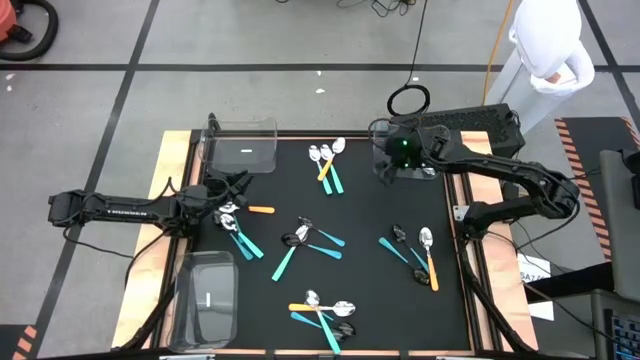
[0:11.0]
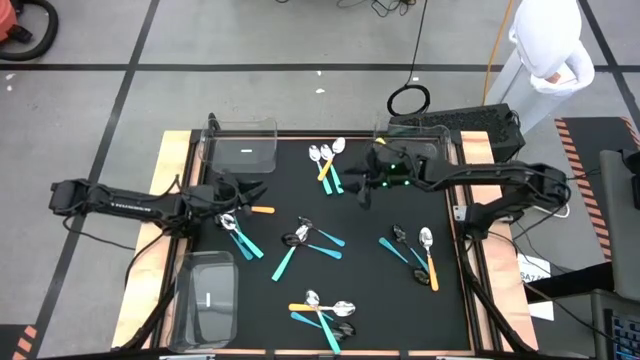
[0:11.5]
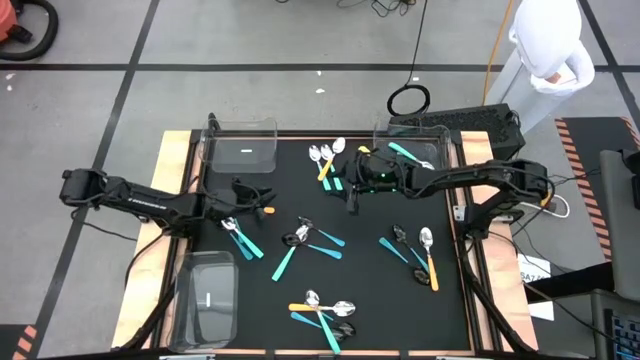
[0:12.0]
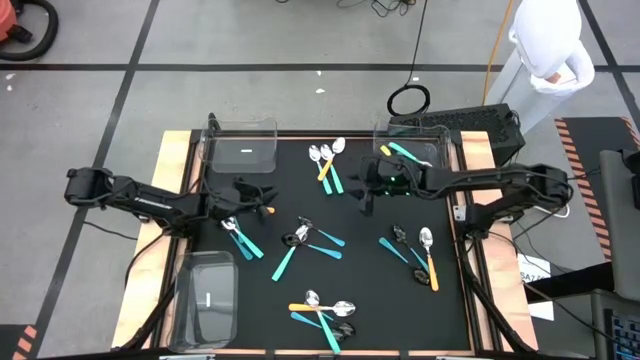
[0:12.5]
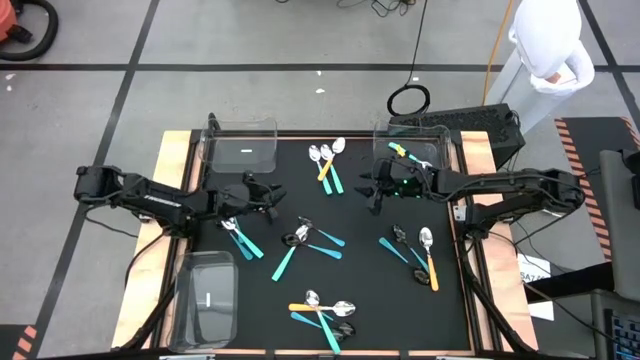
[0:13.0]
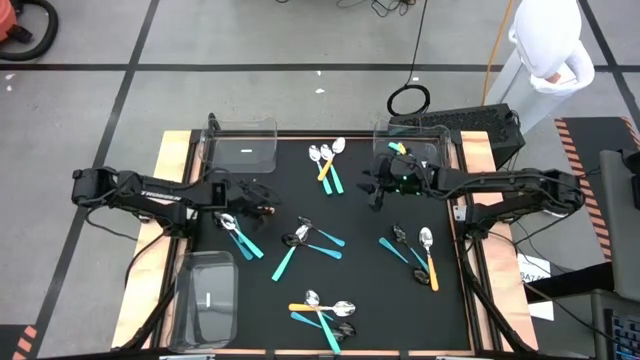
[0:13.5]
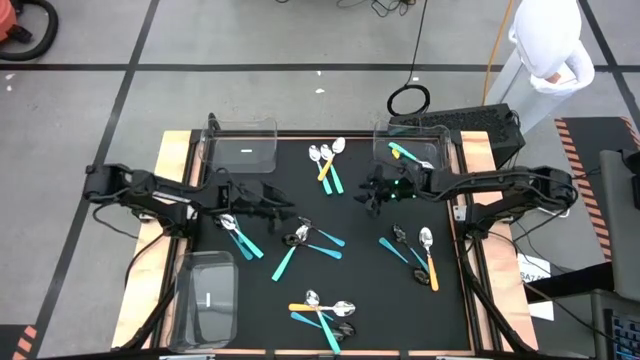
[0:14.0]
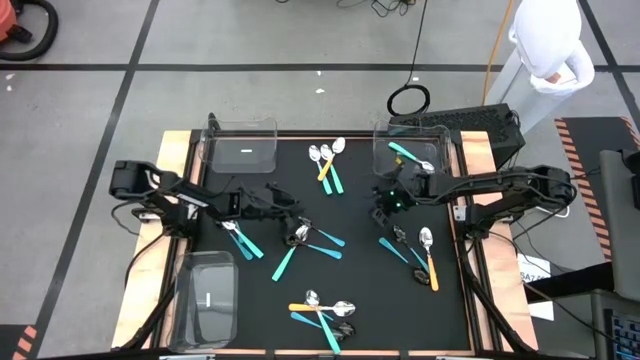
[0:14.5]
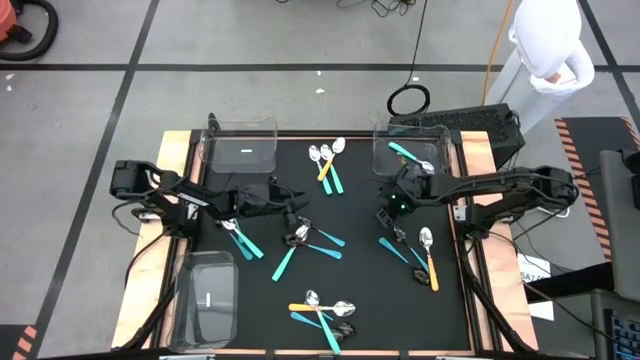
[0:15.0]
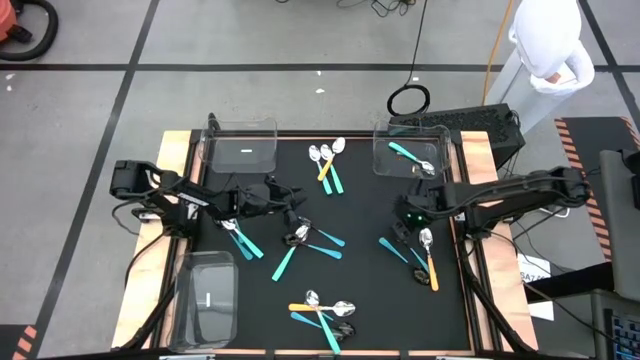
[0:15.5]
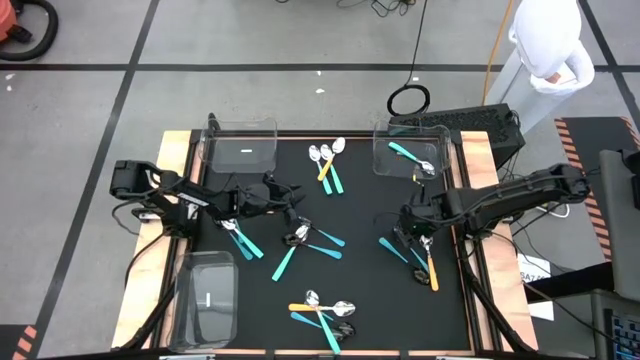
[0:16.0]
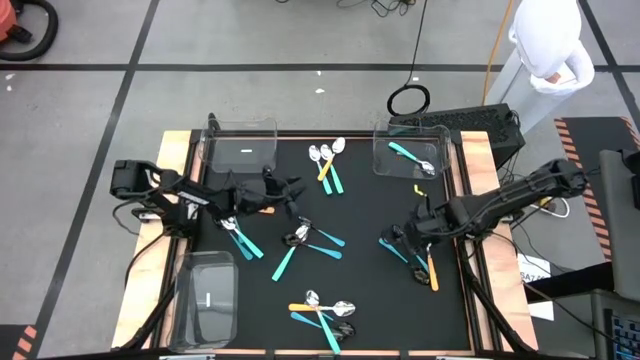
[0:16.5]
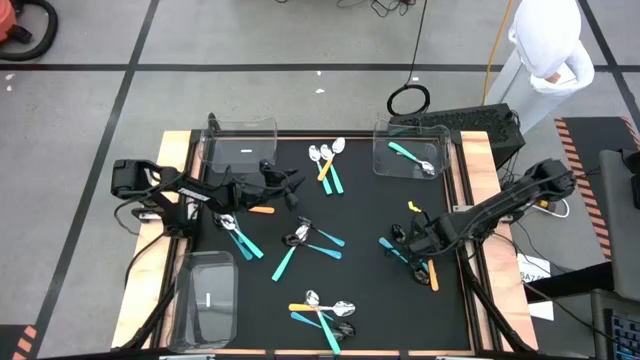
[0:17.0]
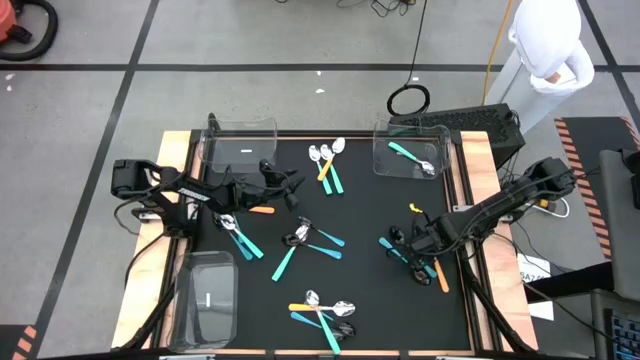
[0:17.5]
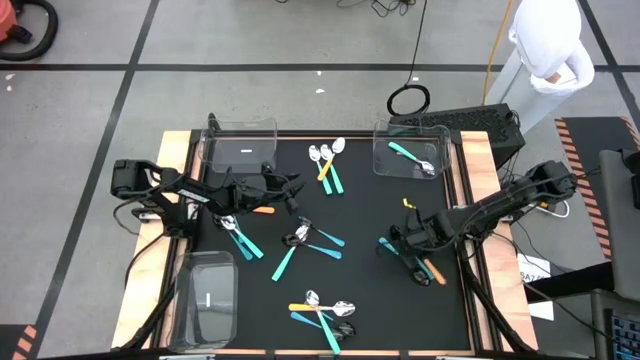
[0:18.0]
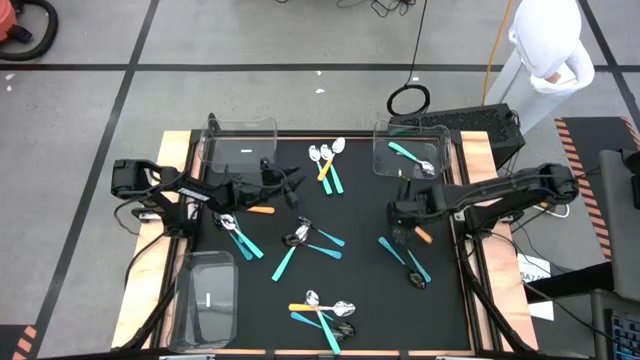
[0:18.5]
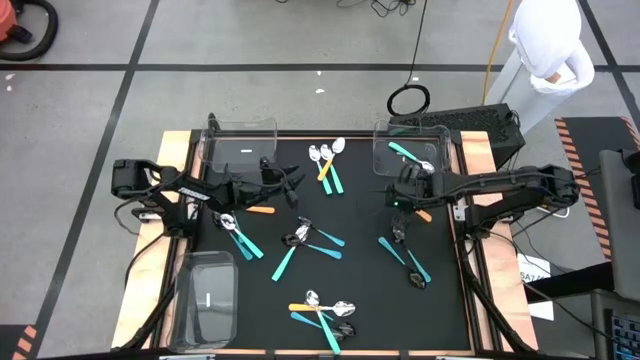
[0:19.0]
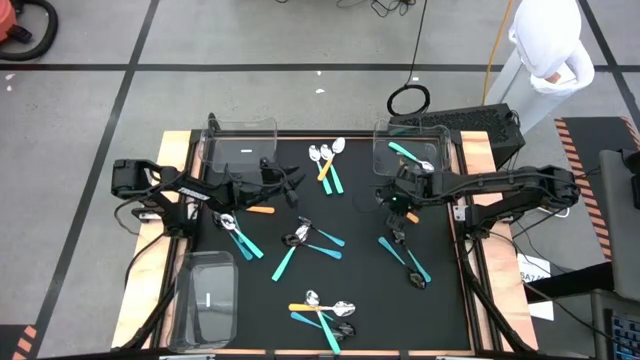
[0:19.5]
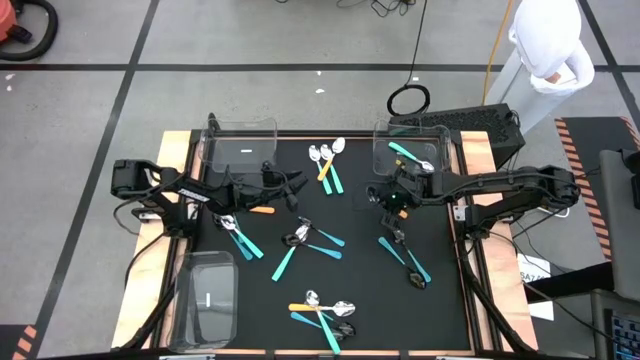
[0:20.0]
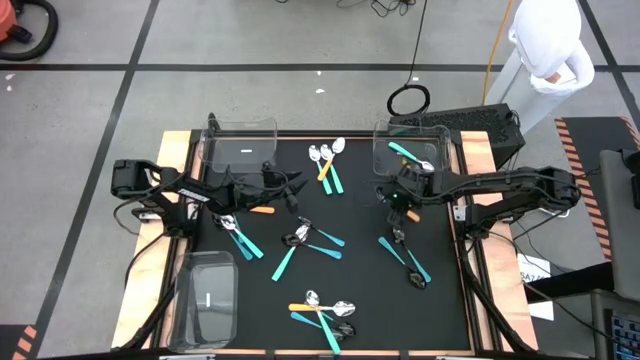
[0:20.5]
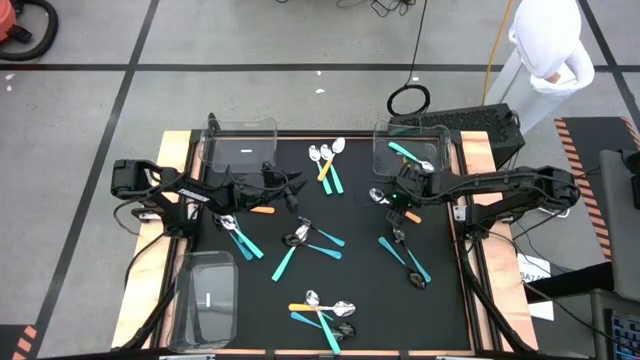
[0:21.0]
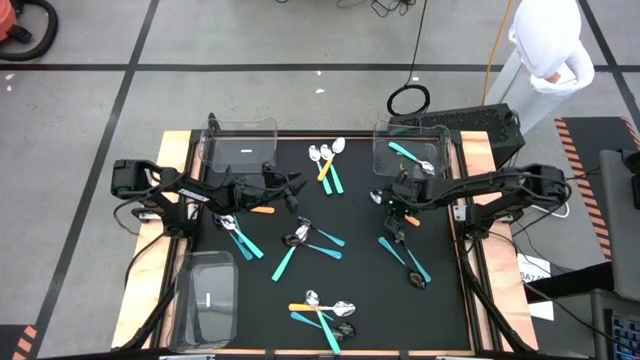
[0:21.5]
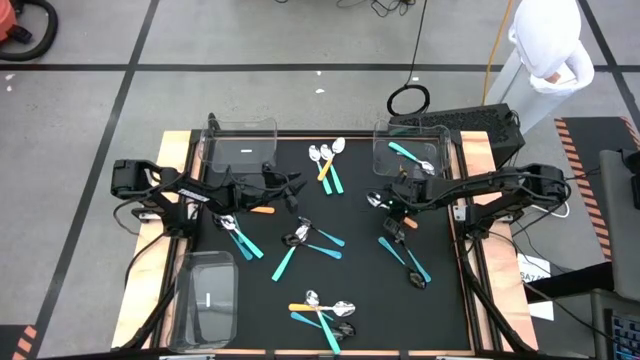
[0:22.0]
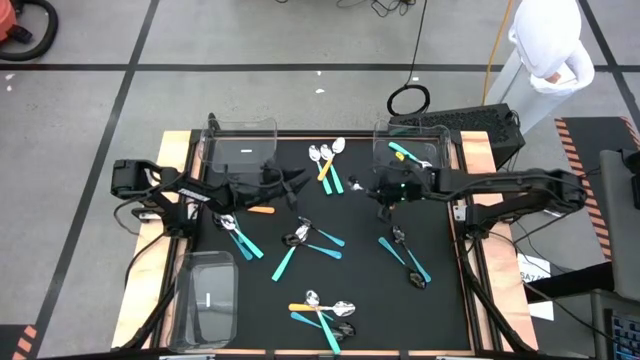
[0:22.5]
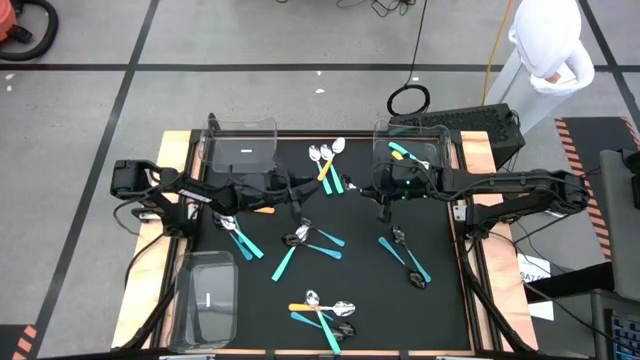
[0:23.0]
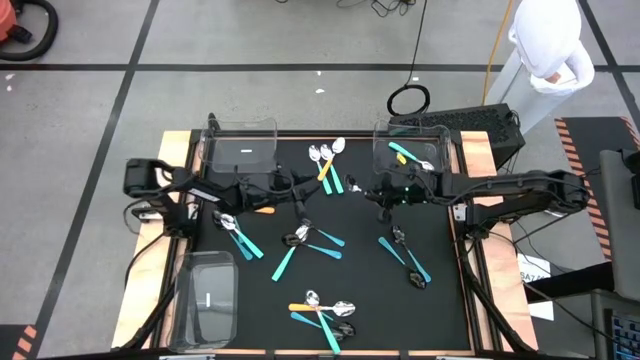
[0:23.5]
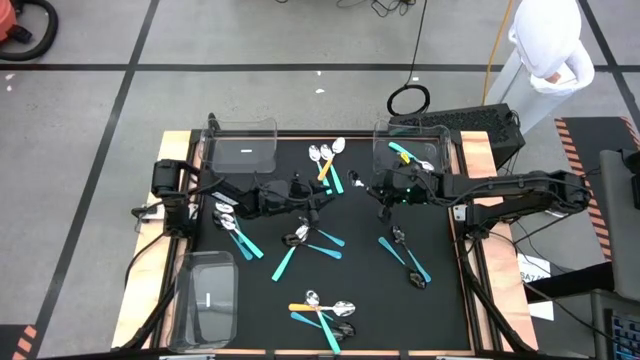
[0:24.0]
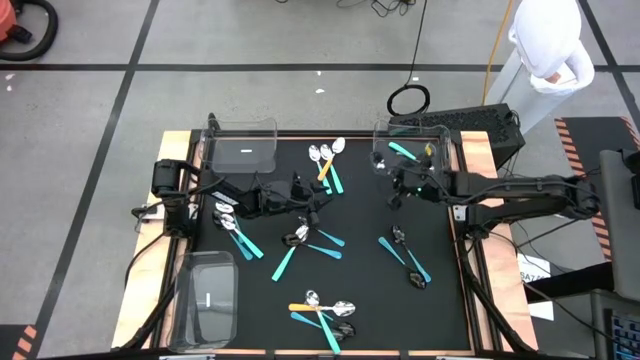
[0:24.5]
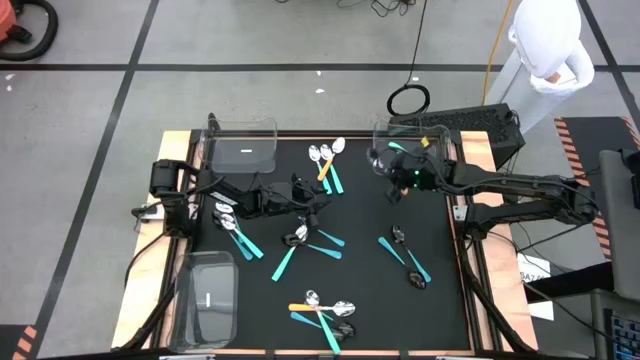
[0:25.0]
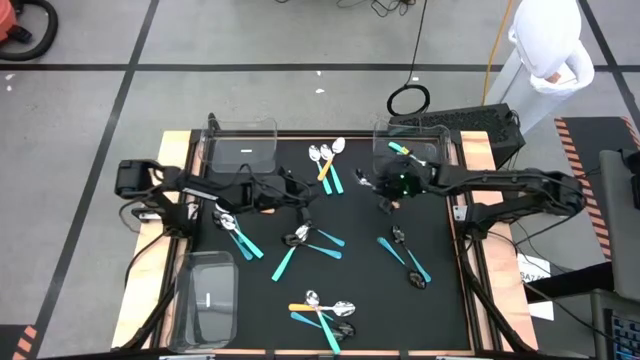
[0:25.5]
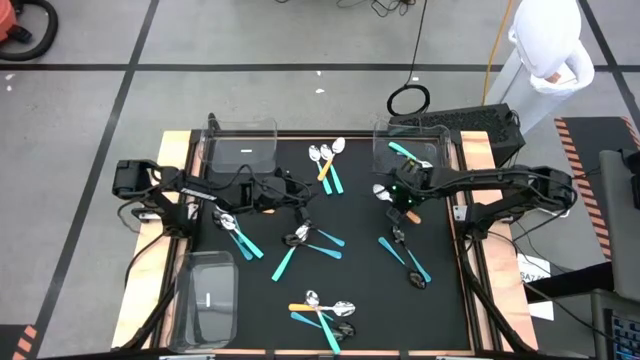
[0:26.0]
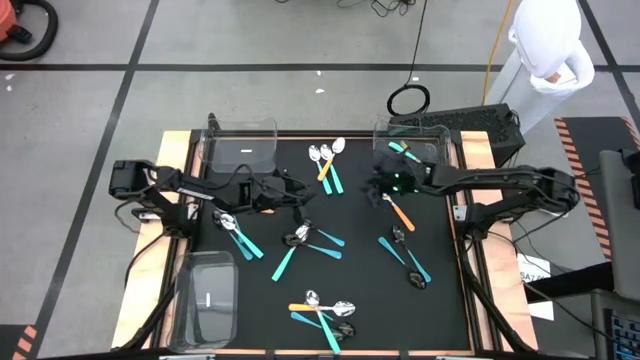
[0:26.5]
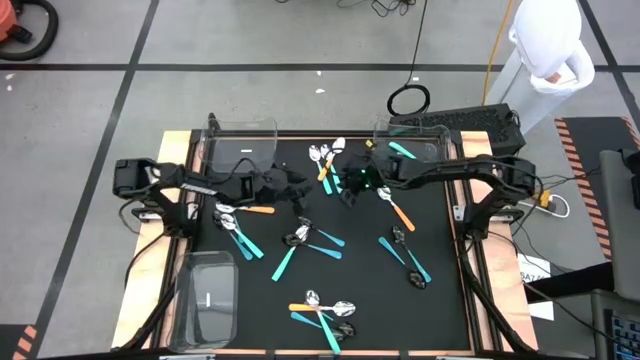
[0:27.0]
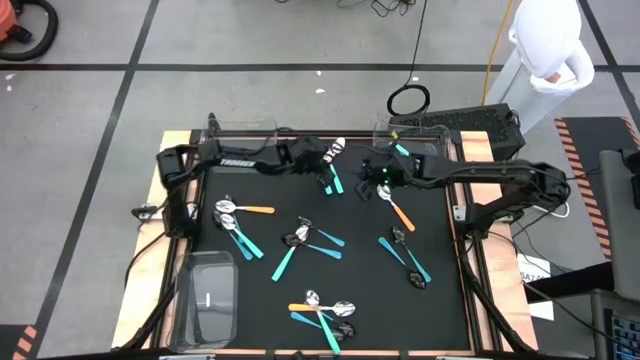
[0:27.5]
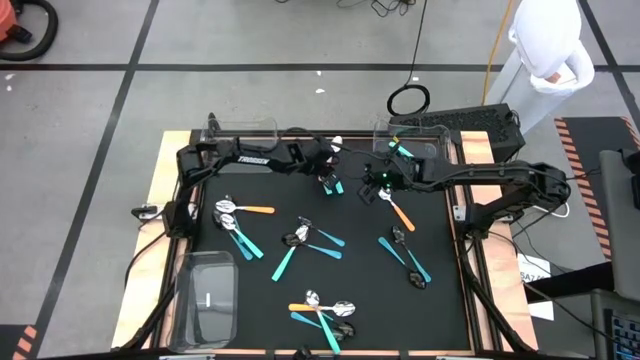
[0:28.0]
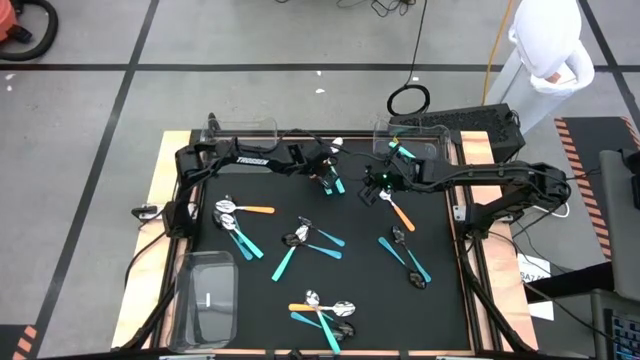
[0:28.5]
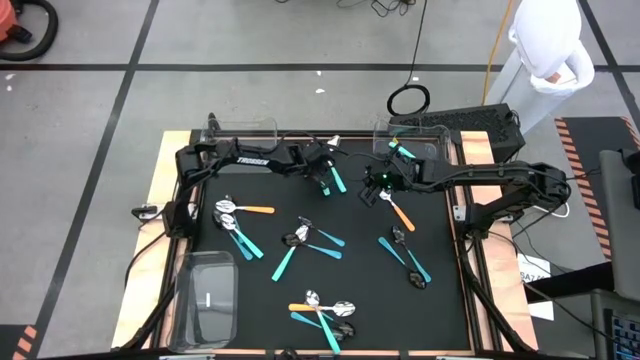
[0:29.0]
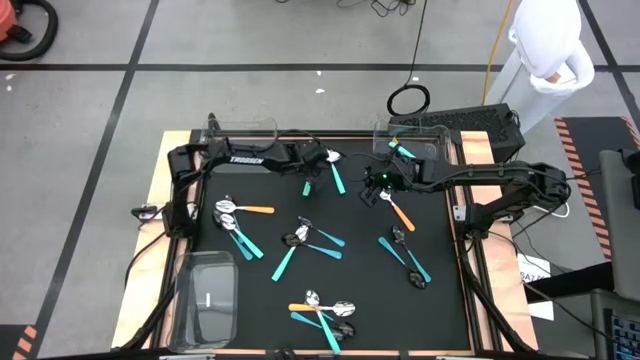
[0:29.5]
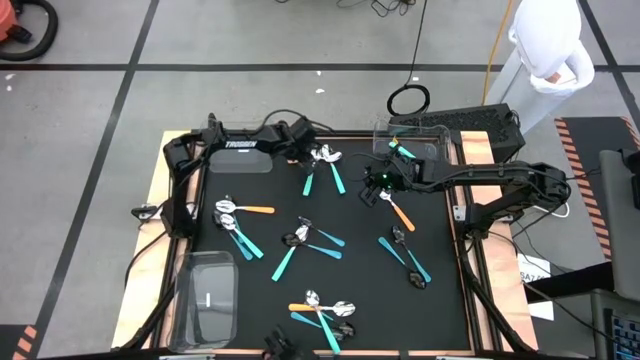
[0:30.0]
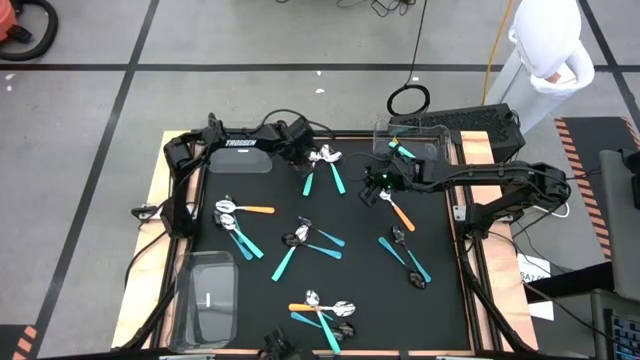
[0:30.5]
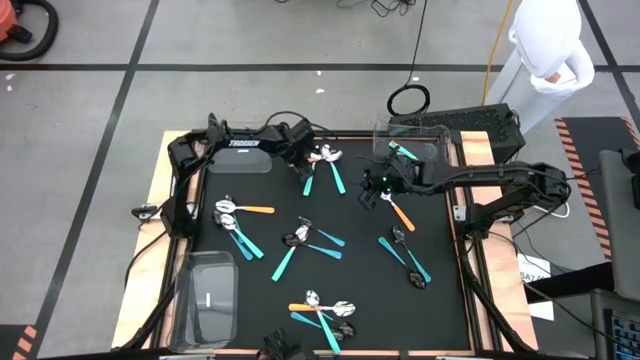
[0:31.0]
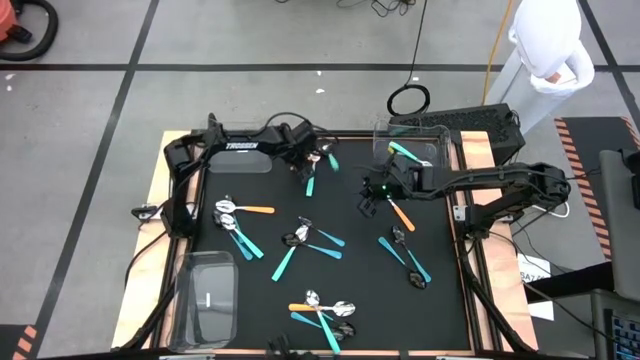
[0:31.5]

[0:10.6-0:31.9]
Task: Sort silverware by color (type)
Put the yellow spoon into the top left bin

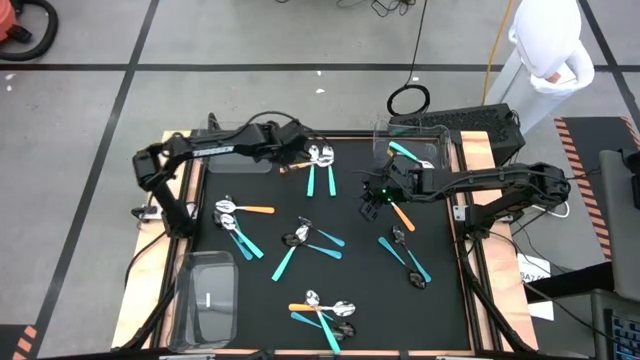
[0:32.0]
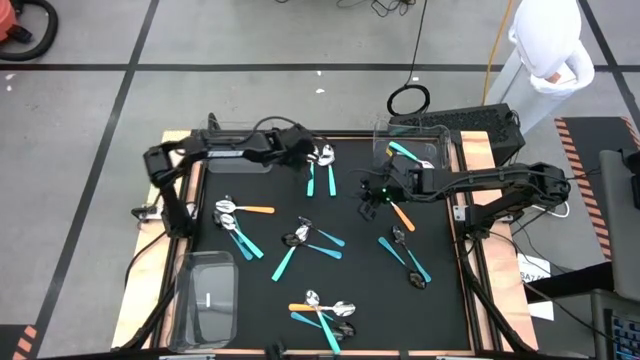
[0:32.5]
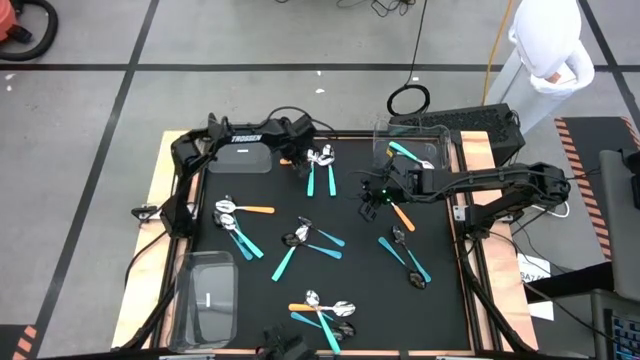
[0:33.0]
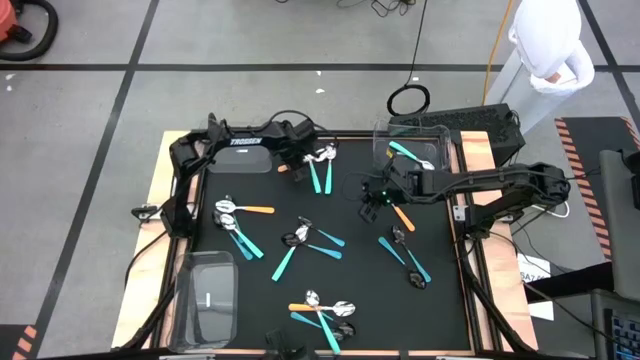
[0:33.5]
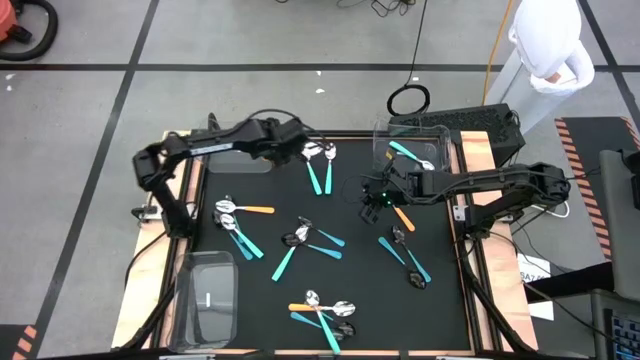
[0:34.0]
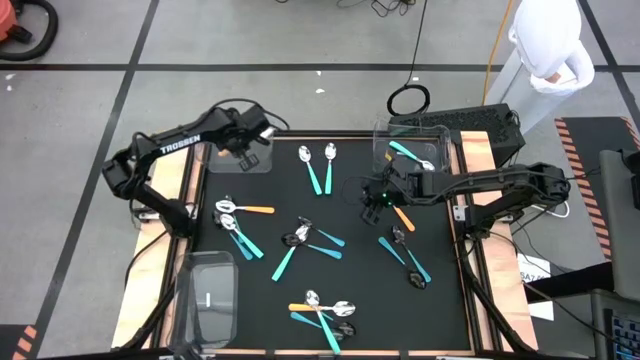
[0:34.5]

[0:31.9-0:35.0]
Put the yellow spoon into the top left bin
